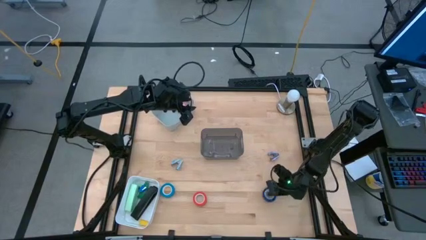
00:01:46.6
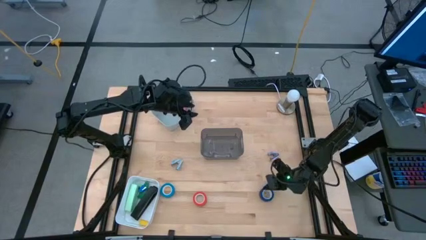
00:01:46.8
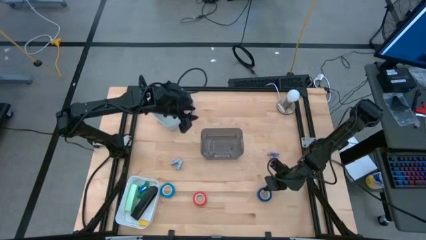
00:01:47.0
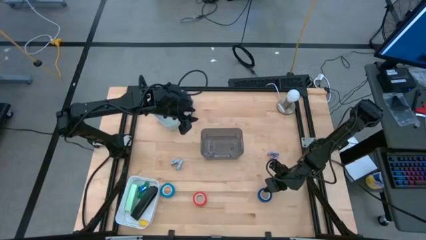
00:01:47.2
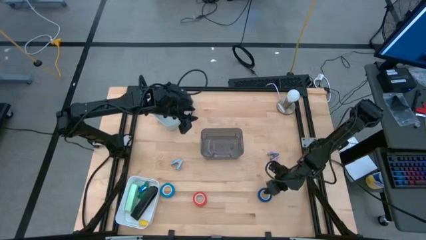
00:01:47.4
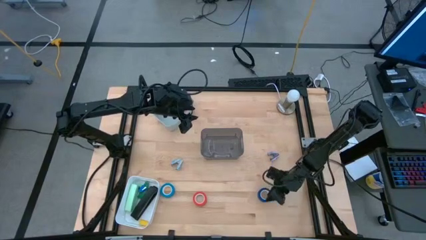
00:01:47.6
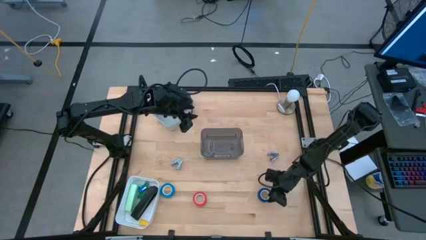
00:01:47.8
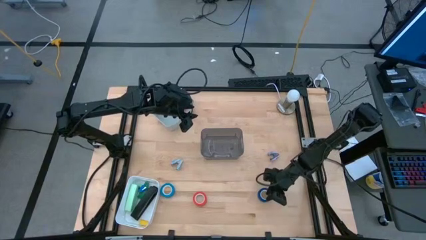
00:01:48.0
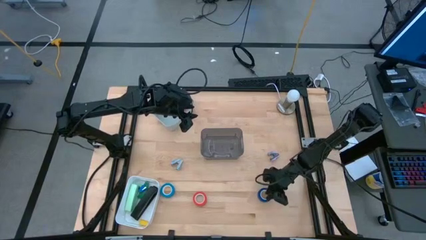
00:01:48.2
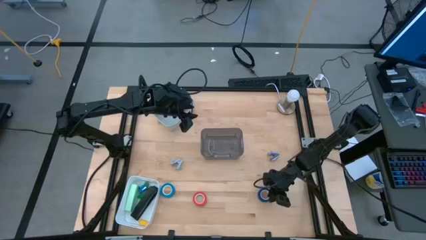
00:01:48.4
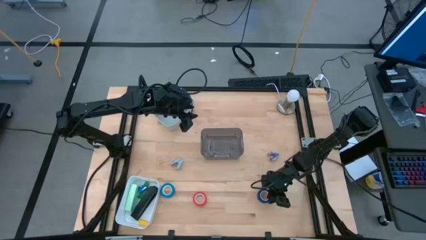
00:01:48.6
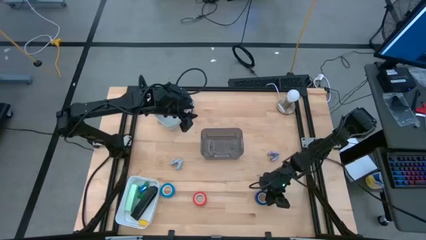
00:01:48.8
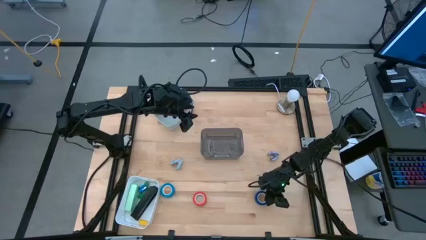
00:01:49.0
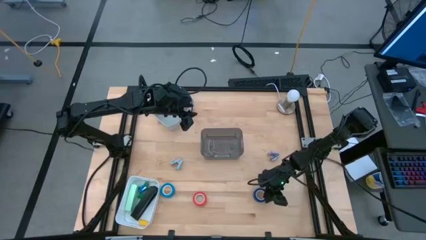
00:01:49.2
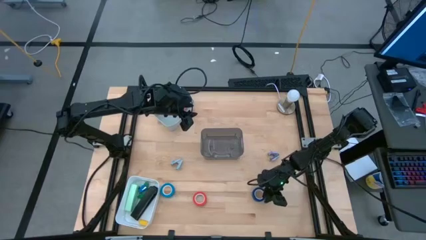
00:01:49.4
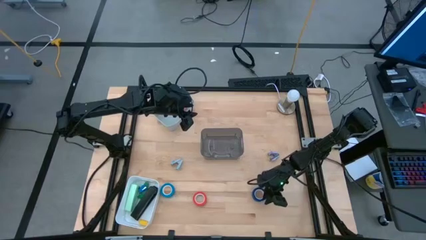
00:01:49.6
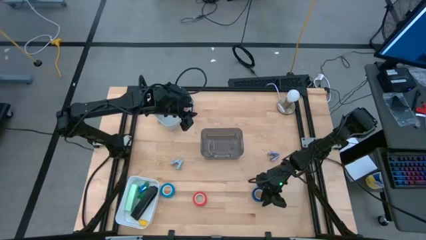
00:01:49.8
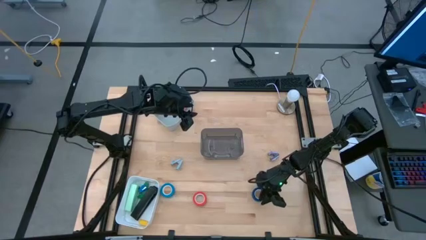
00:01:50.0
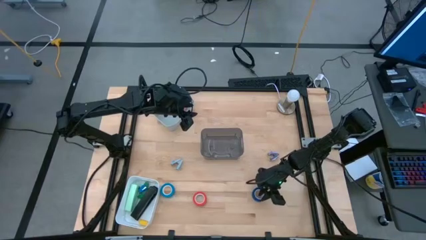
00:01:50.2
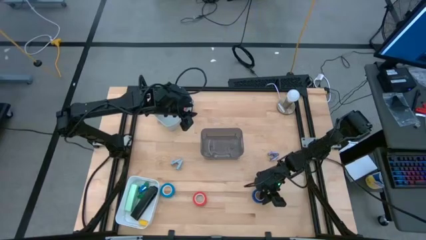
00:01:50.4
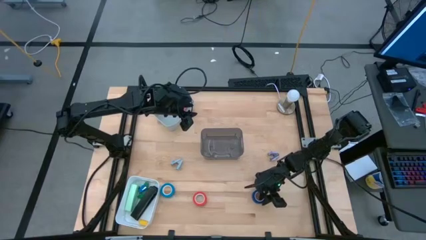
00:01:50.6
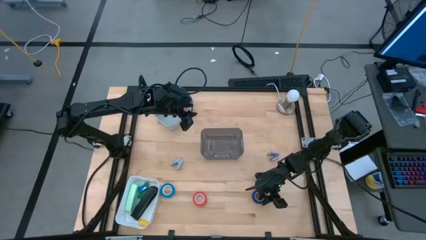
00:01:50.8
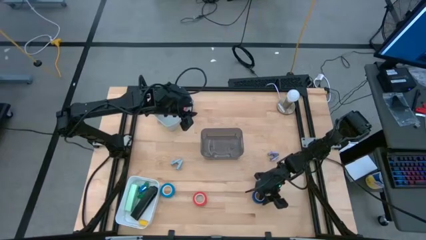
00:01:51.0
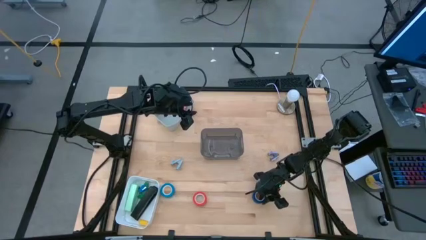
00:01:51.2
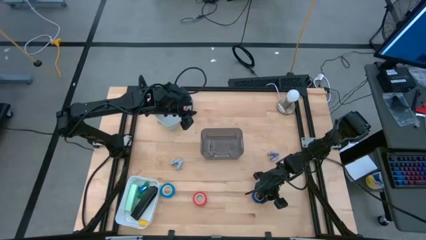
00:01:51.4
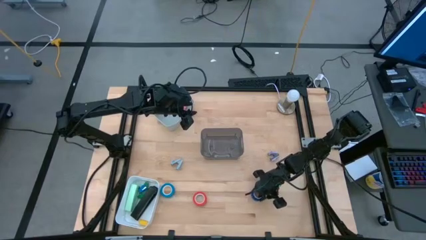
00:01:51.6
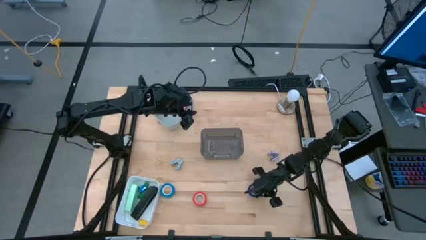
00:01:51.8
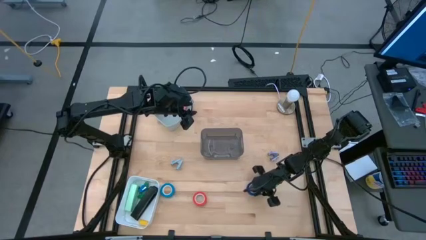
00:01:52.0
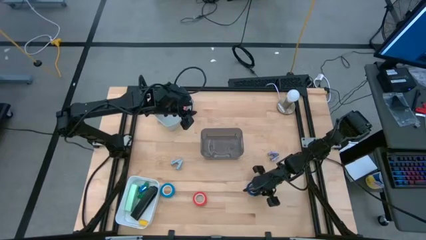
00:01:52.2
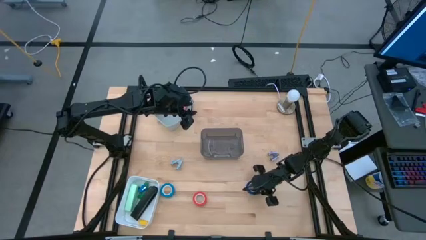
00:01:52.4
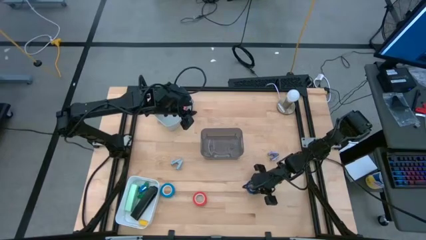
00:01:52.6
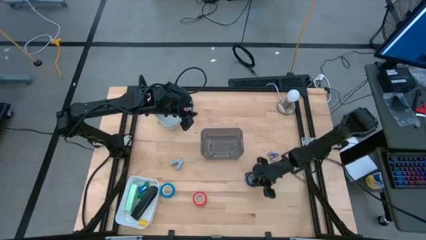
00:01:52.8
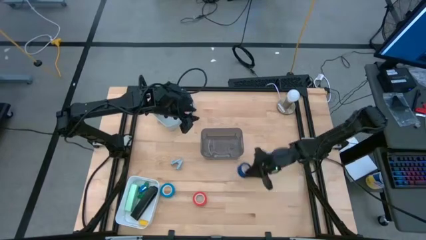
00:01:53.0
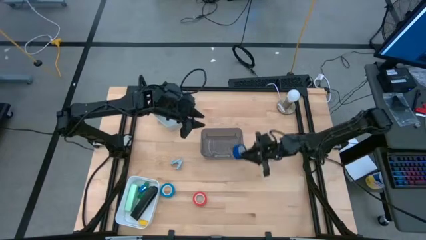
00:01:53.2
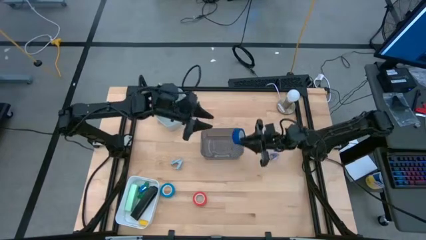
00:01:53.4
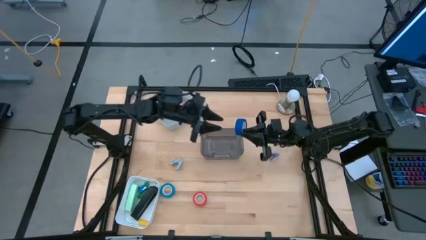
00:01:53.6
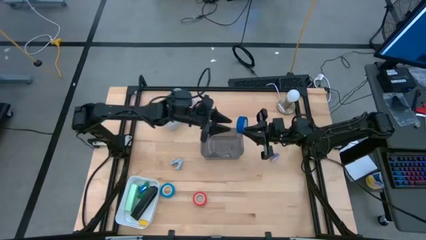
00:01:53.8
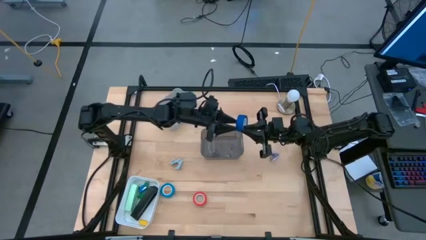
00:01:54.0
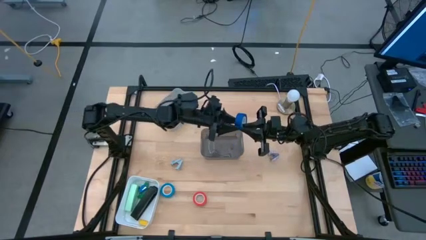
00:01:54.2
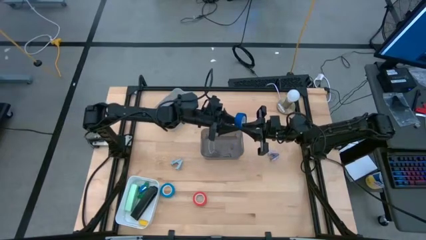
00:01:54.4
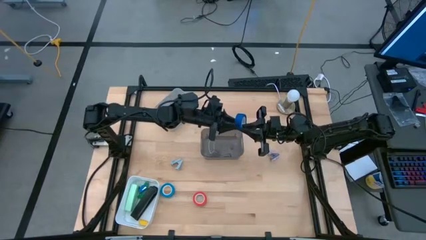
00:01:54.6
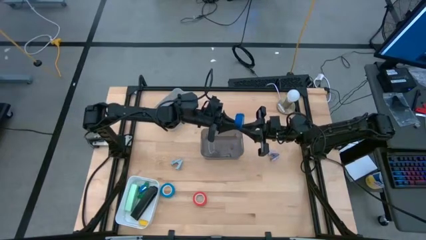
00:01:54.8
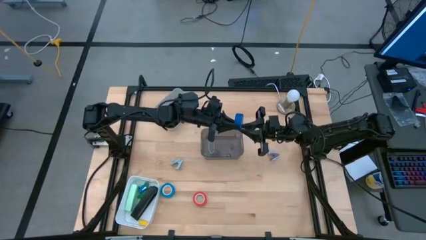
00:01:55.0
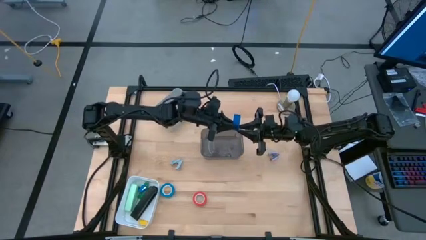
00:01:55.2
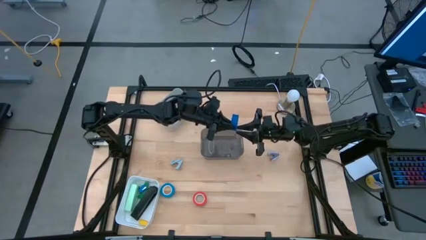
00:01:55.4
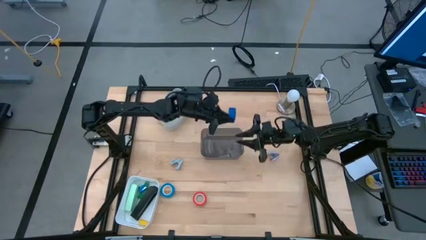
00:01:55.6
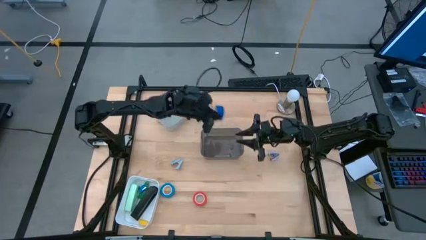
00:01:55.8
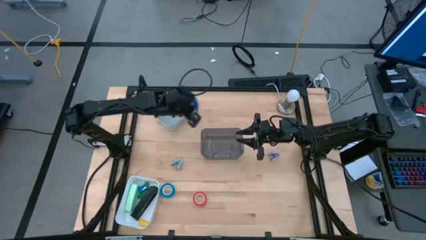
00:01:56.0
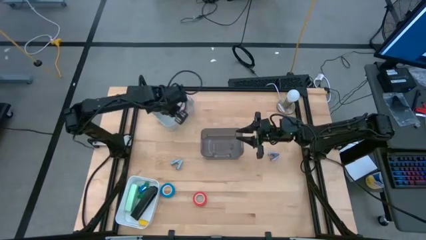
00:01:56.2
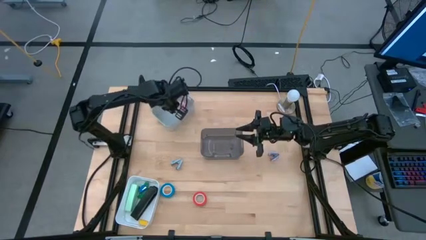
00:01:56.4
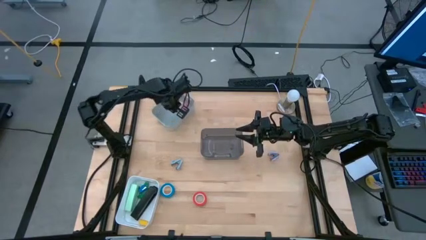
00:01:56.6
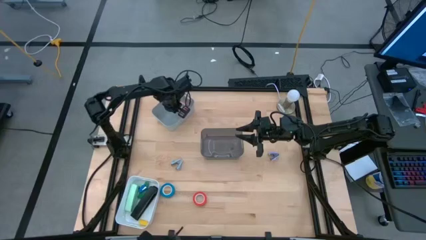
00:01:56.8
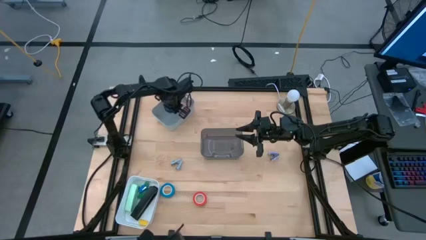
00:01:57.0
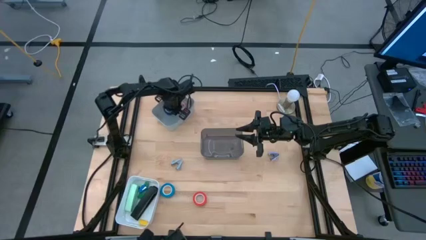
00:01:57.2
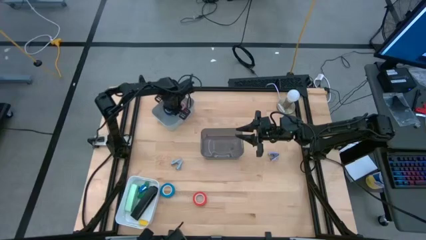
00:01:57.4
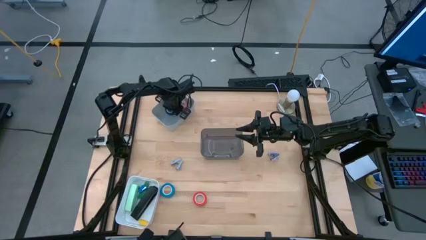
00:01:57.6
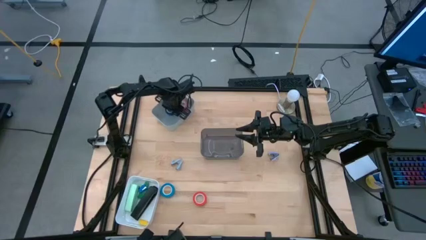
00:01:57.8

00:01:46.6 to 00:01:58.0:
Task: Pick and place Stapler, Stapler remover, tape
Put the blue tape into the grey bin

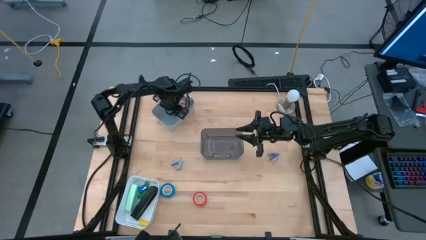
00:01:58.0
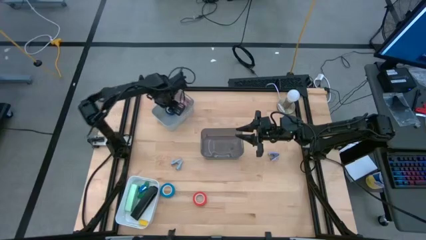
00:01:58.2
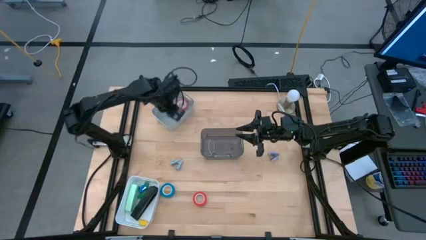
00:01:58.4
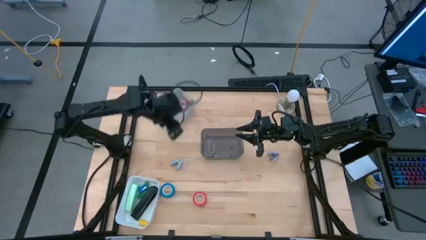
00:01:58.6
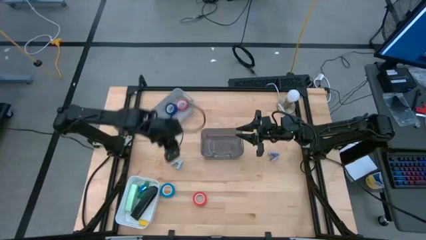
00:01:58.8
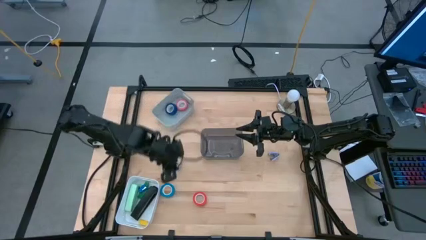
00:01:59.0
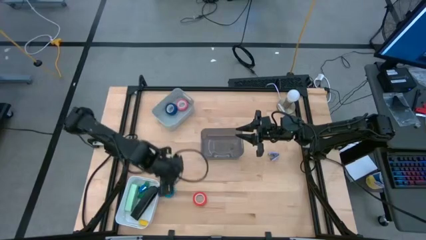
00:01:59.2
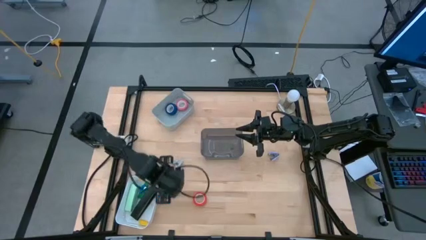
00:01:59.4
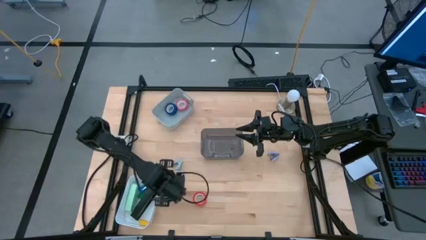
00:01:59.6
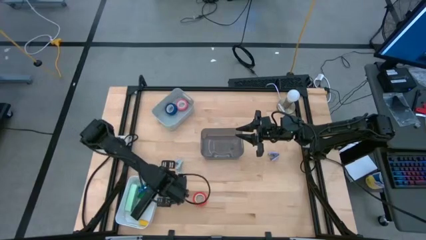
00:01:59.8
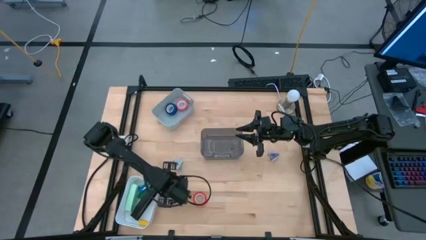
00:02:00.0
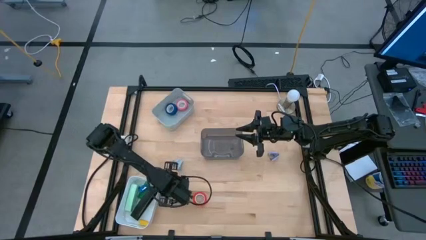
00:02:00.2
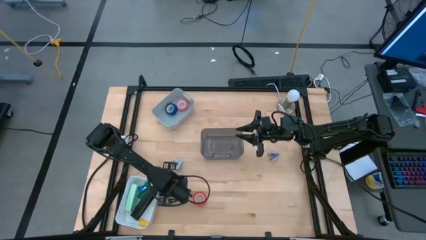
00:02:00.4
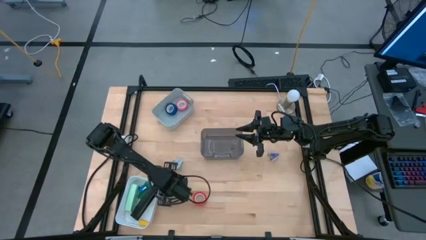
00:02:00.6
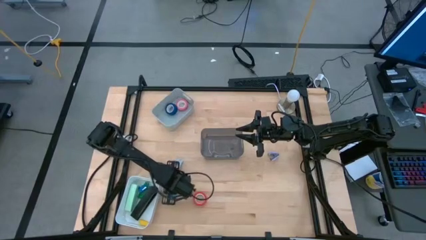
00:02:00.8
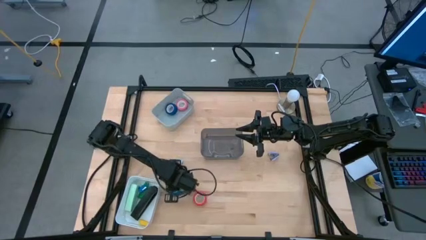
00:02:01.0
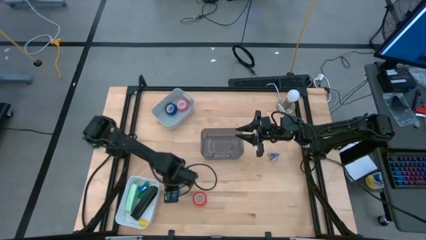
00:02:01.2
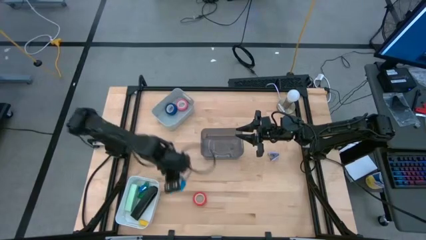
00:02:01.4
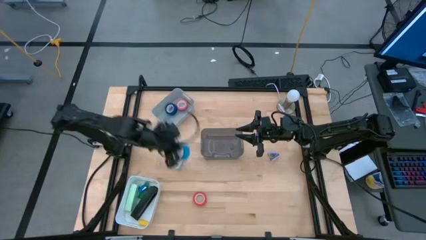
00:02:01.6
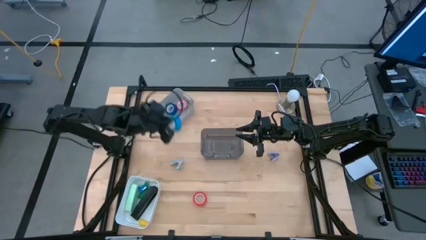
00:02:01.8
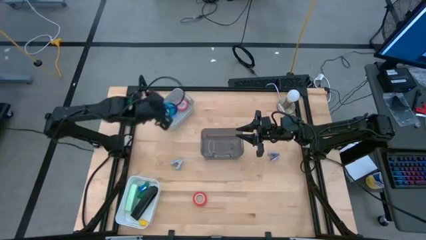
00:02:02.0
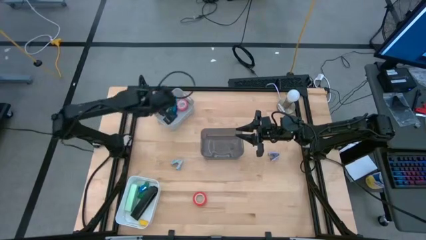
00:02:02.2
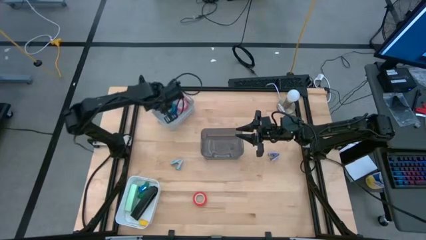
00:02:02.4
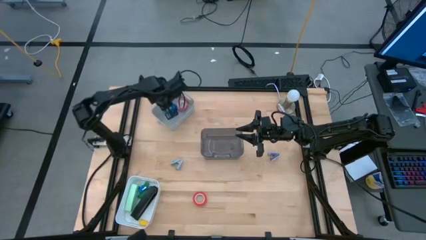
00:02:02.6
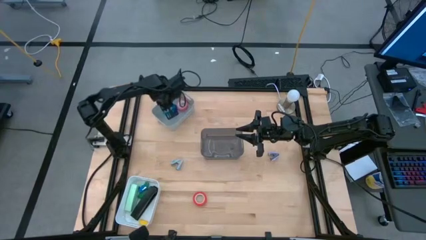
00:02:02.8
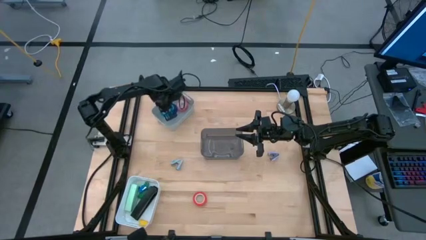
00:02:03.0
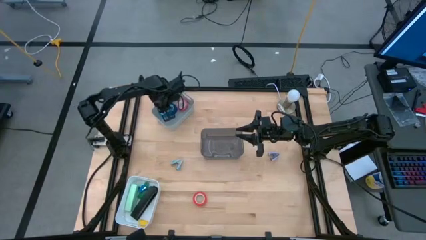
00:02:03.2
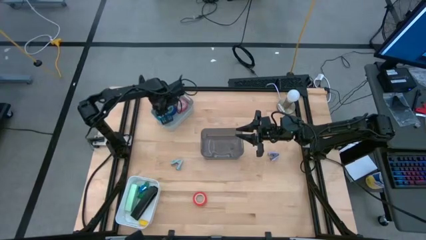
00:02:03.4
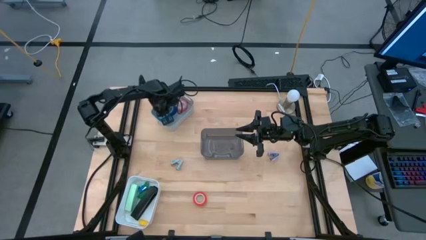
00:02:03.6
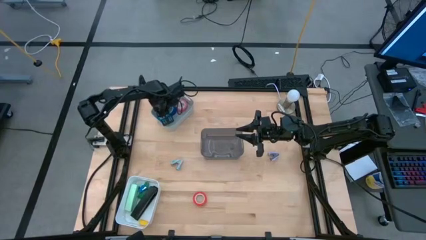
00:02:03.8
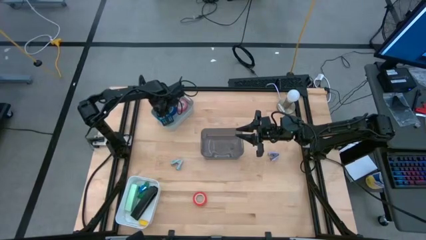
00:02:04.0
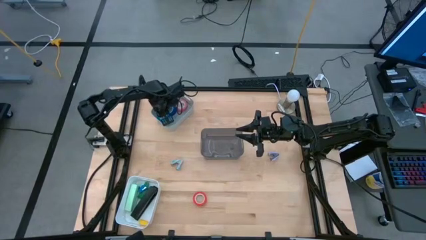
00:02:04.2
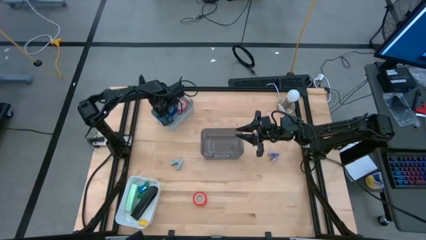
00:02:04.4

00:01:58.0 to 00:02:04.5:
Put the light blue tape into the grey bin
